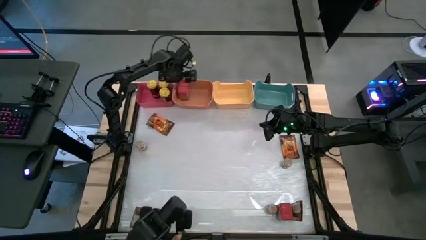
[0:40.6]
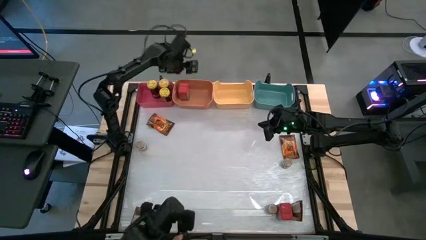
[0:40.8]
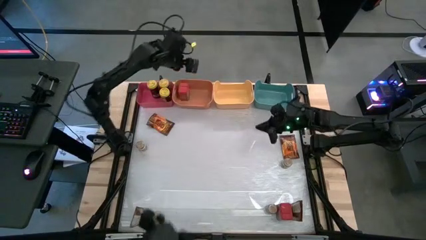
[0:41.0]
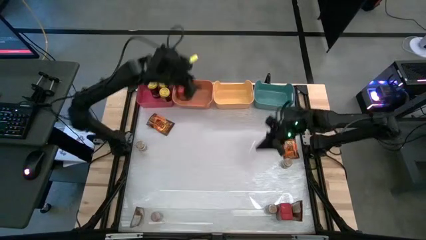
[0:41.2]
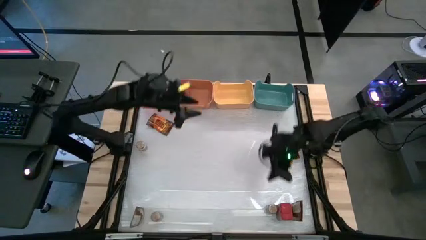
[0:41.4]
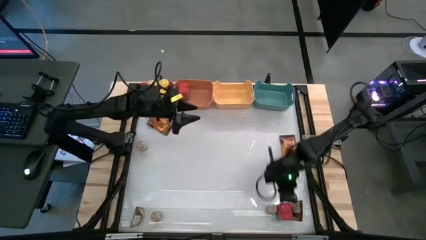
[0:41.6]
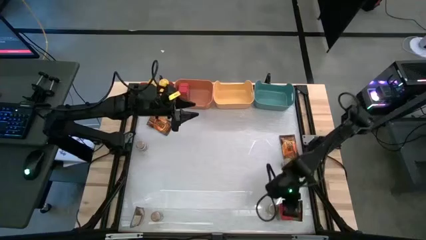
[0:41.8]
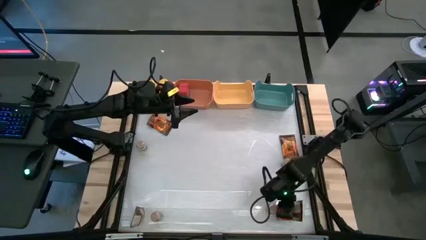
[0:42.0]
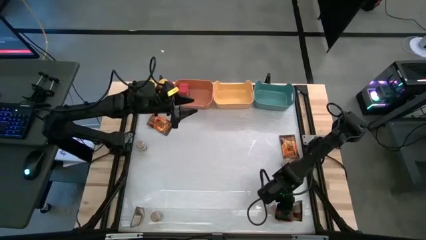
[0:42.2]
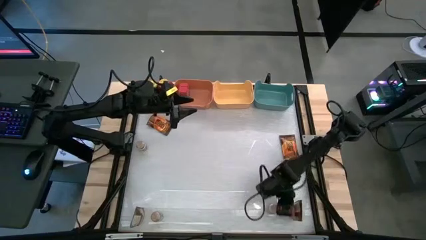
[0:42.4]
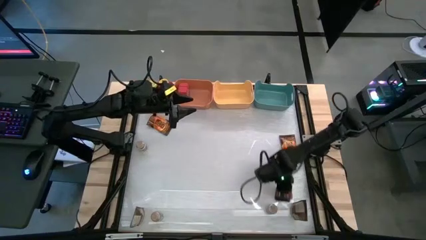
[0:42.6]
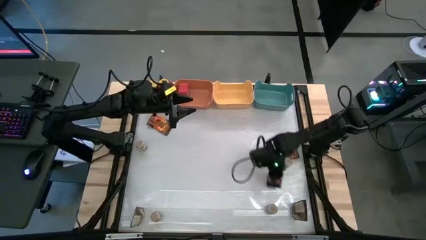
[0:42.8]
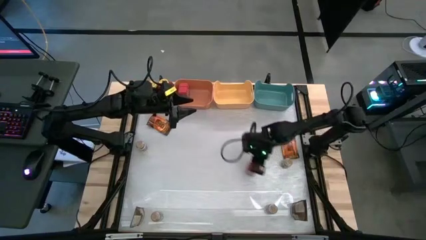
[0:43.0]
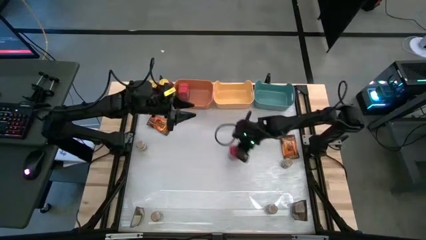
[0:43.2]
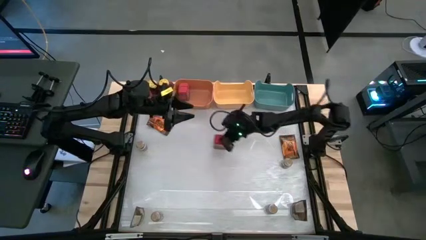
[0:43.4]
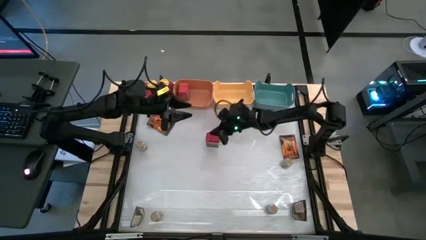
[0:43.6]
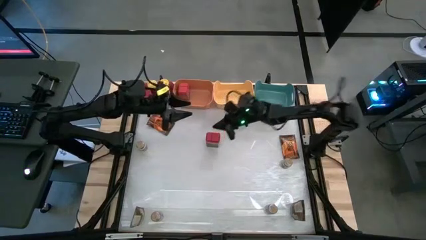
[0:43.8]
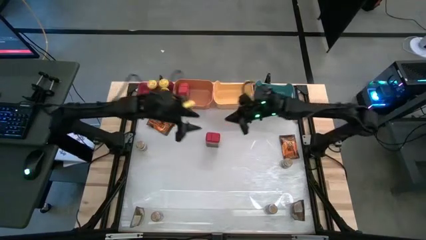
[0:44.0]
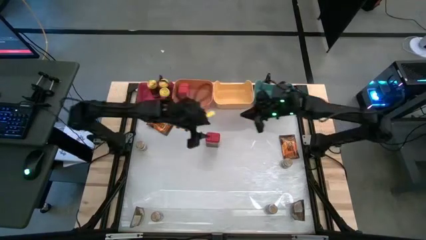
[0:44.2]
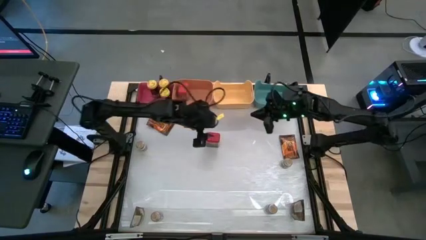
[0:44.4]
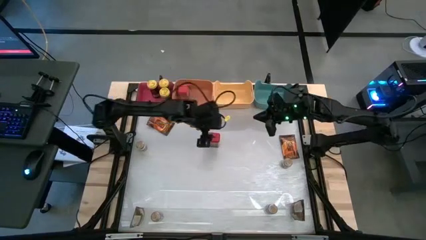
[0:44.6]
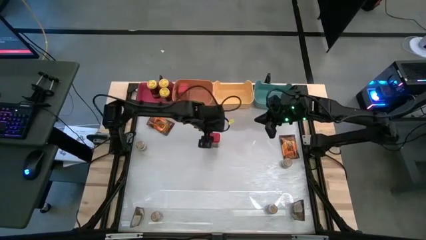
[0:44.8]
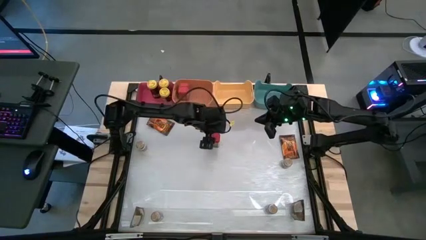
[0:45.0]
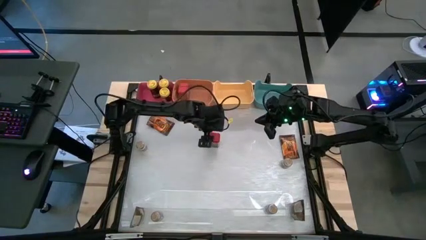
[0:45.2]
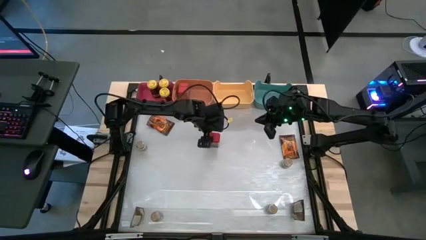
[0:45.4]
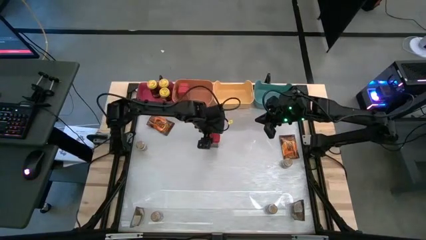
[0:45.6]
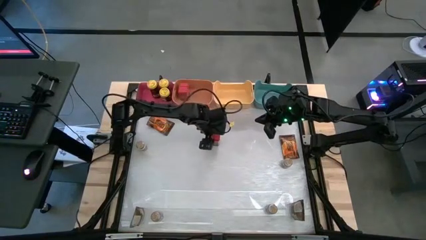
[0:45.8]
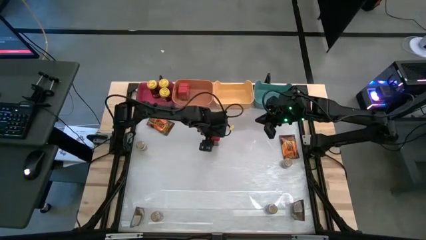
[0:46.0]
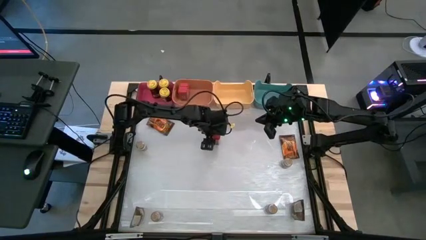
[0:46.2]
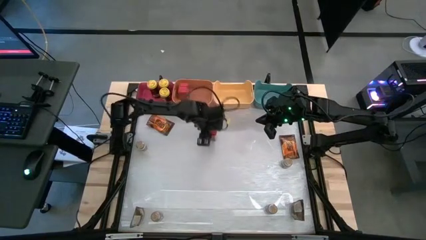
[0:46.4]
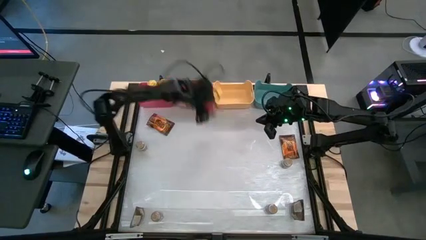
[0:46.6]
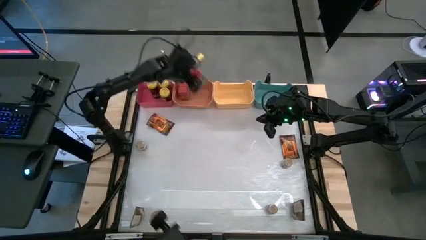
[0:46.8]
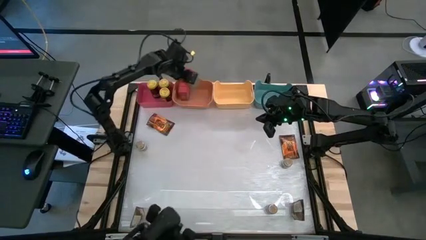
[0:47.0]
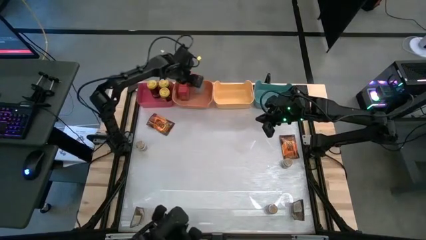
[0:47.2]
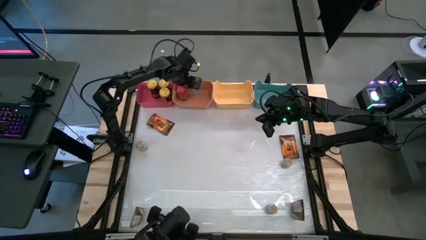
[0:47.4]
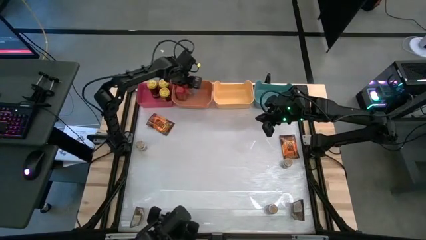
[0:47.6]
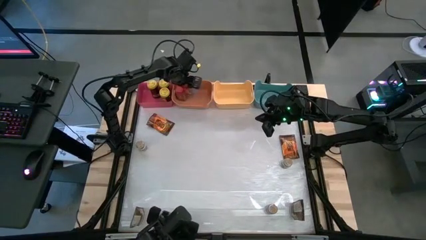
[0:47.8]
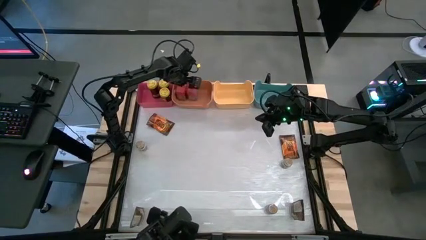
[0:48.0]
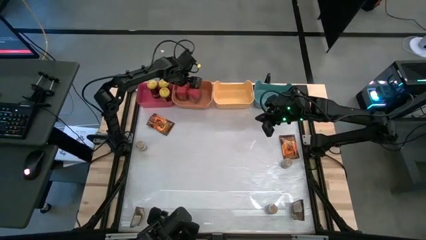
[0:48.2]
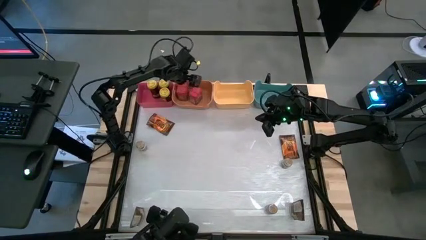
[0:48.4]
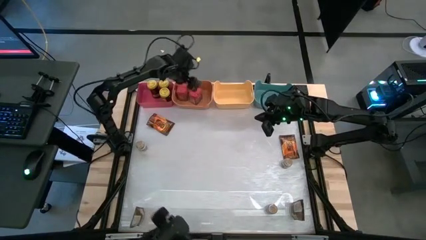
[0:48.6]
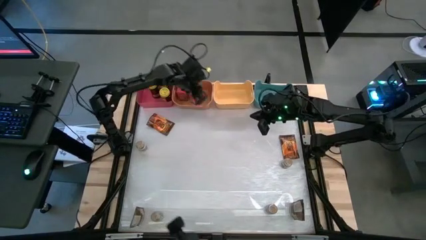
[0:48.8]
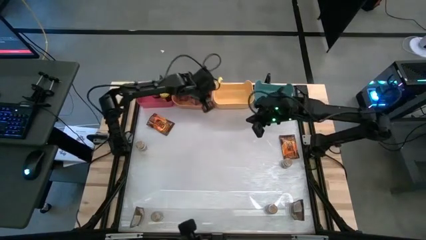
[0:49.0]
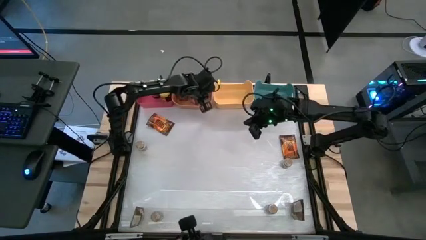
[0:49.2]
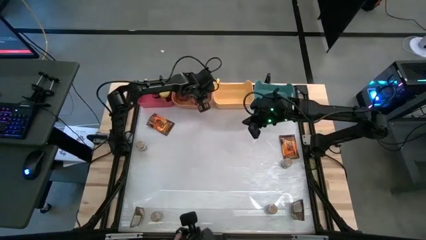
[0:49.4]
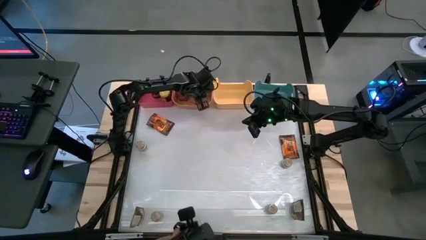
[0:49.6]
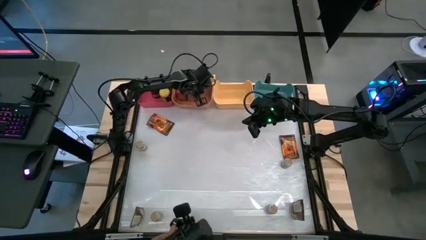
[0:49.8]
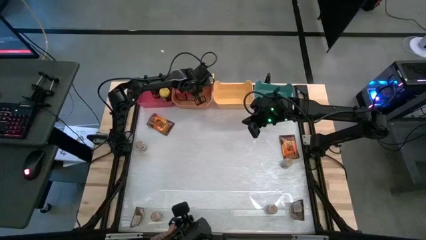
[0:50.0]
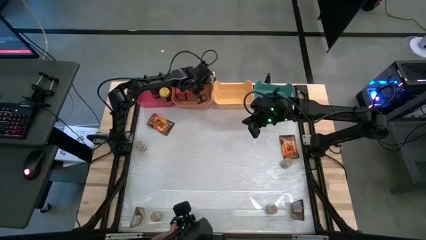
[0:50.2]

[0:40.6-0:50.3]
Task: Sort spices by type
Put the red seasoning can into the orange bin
